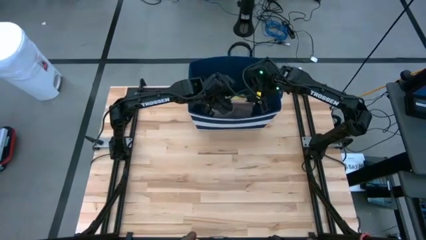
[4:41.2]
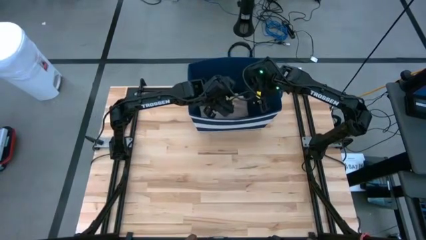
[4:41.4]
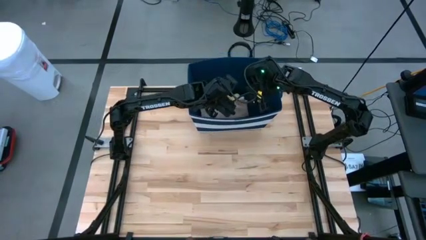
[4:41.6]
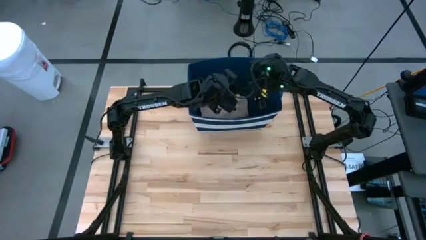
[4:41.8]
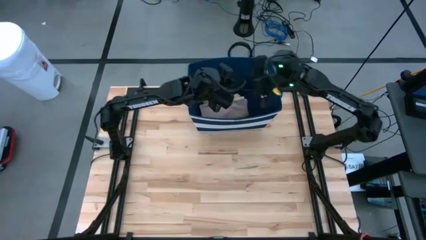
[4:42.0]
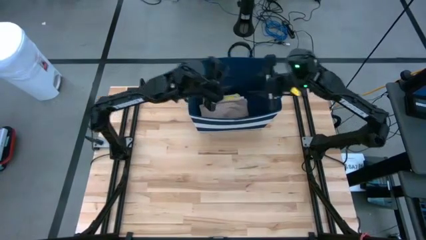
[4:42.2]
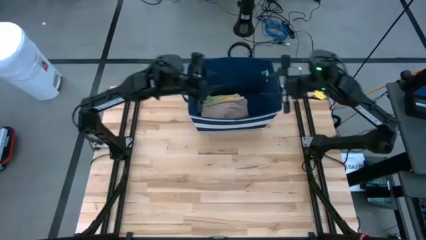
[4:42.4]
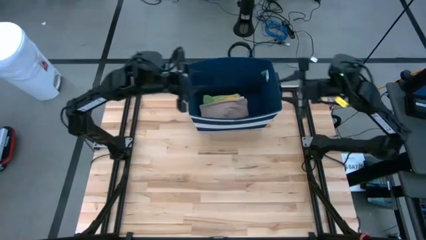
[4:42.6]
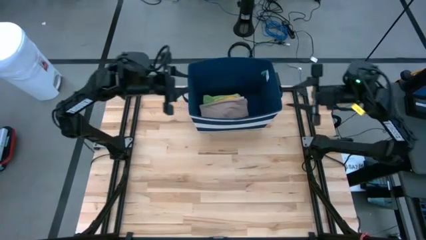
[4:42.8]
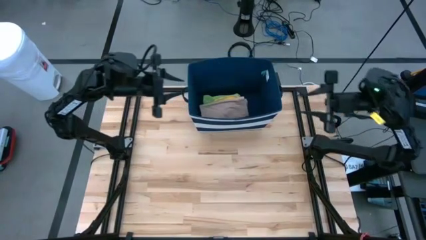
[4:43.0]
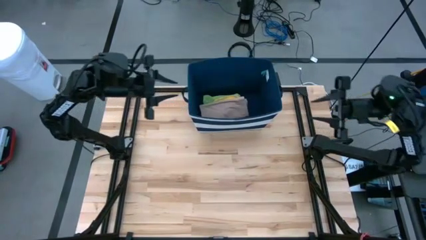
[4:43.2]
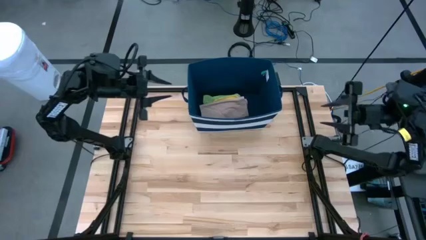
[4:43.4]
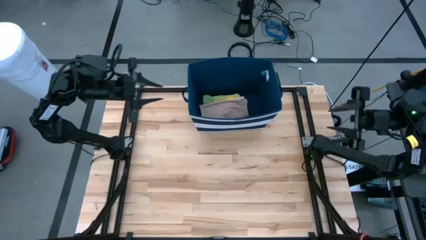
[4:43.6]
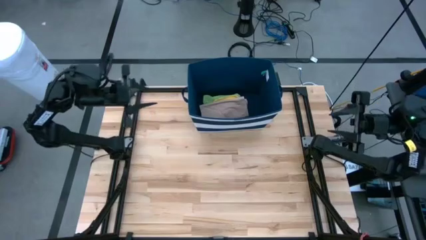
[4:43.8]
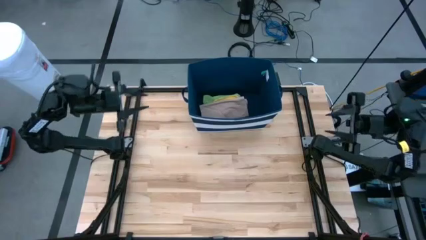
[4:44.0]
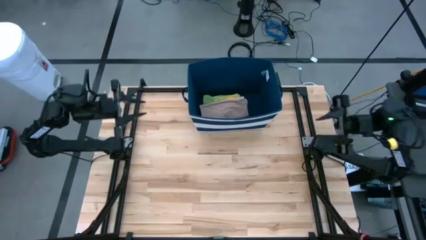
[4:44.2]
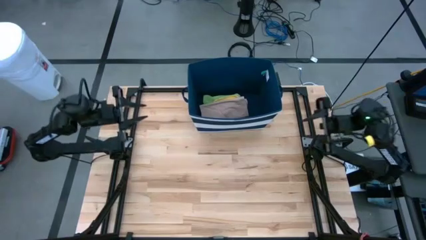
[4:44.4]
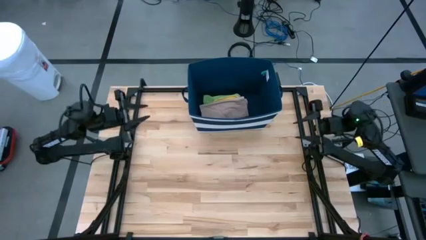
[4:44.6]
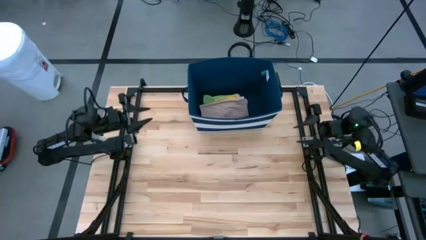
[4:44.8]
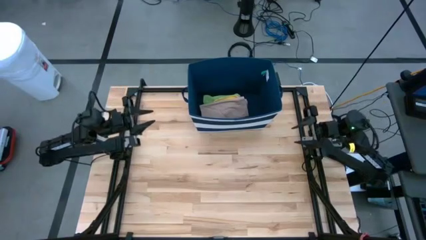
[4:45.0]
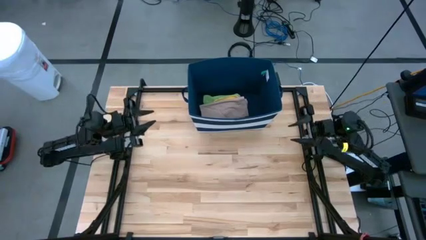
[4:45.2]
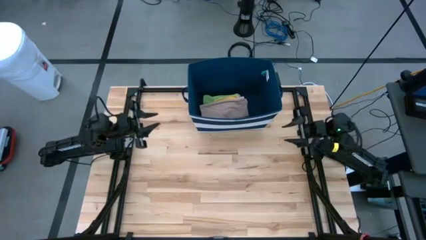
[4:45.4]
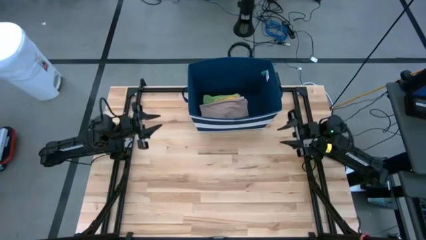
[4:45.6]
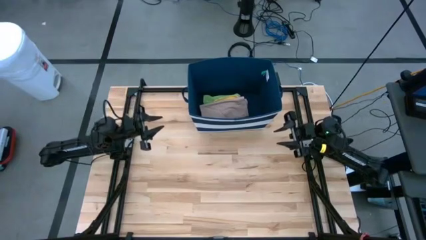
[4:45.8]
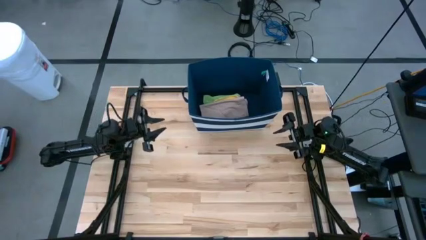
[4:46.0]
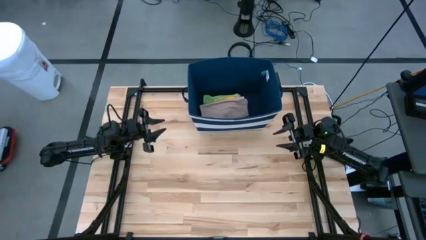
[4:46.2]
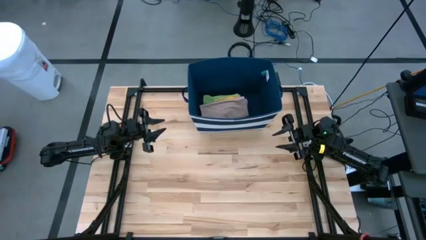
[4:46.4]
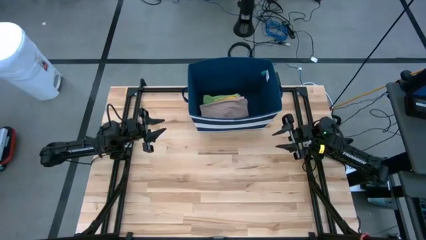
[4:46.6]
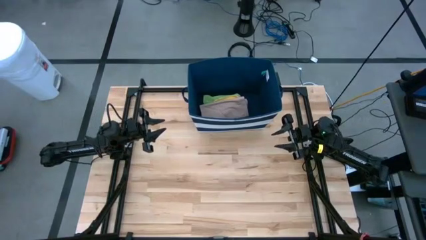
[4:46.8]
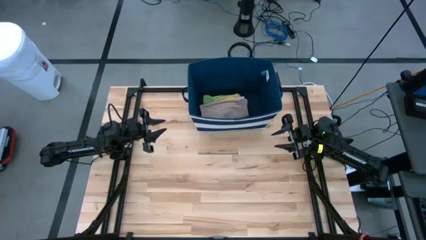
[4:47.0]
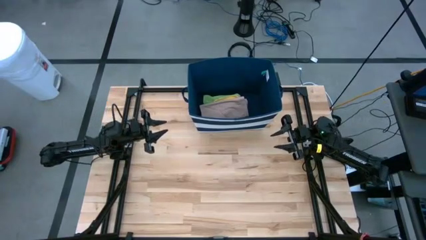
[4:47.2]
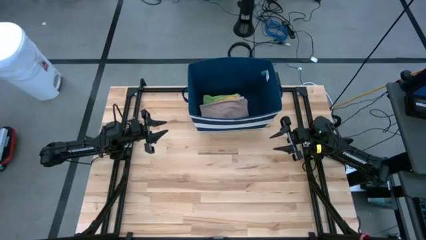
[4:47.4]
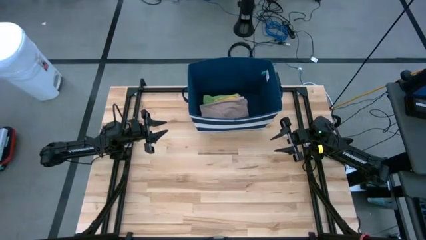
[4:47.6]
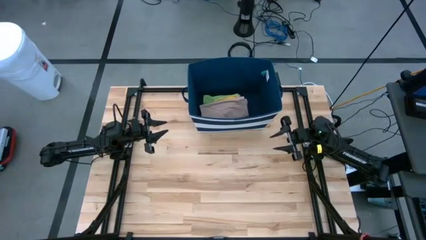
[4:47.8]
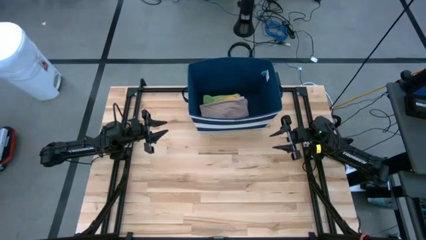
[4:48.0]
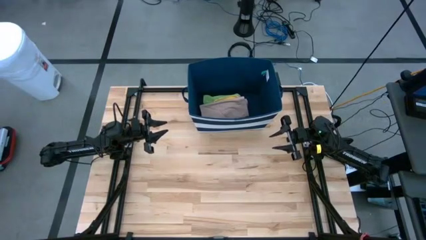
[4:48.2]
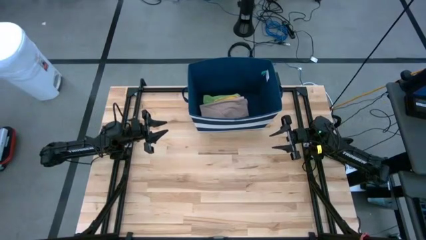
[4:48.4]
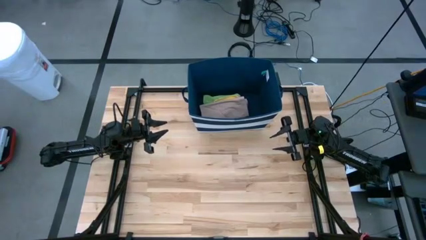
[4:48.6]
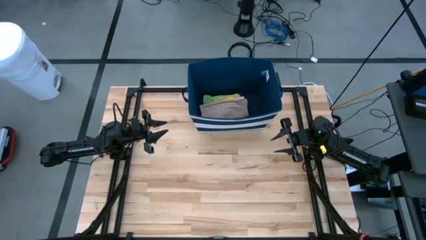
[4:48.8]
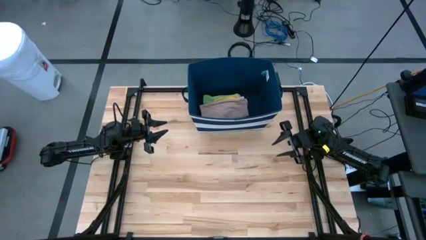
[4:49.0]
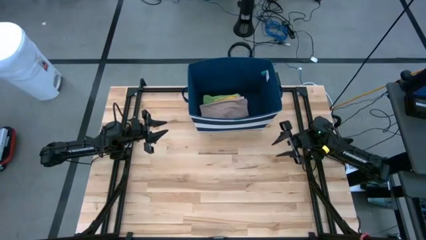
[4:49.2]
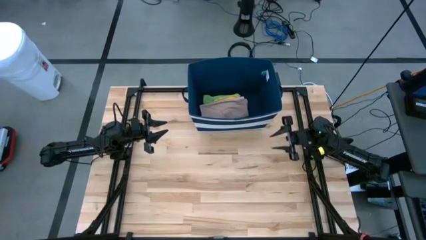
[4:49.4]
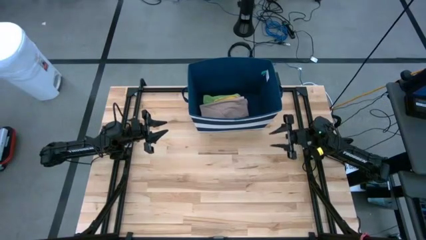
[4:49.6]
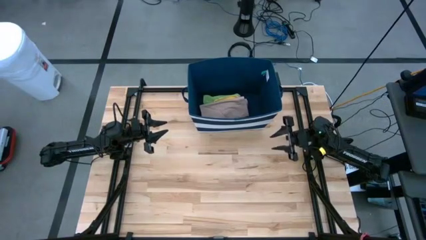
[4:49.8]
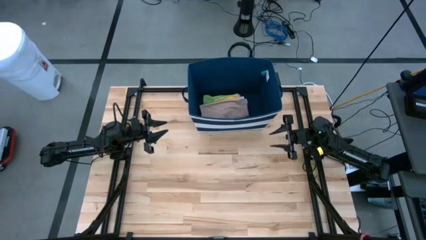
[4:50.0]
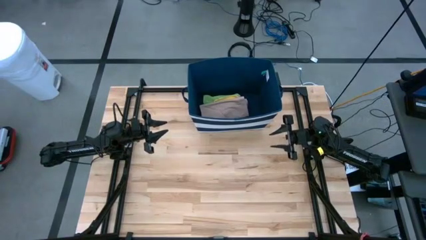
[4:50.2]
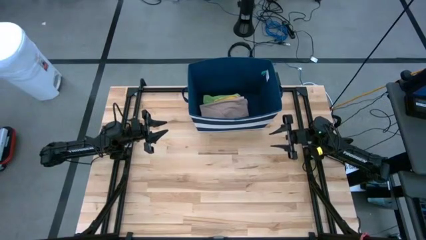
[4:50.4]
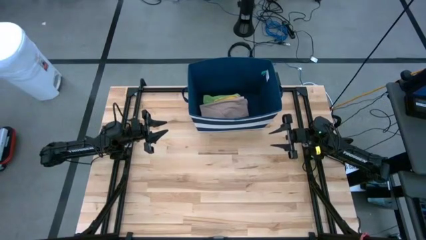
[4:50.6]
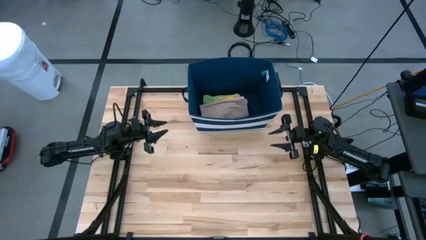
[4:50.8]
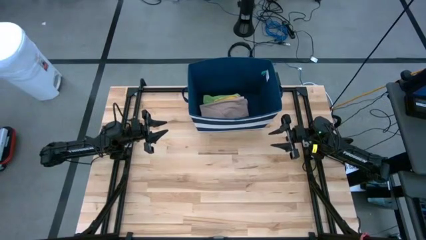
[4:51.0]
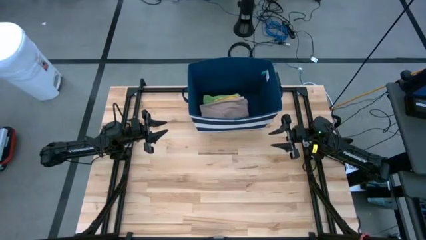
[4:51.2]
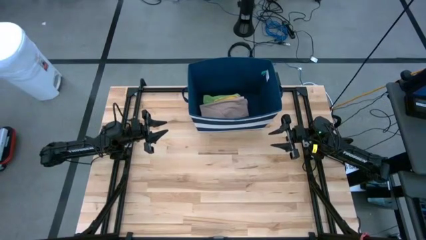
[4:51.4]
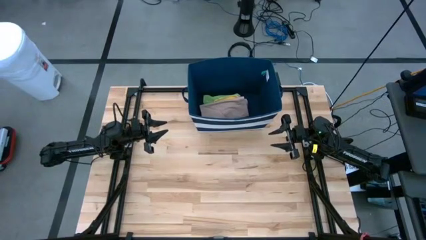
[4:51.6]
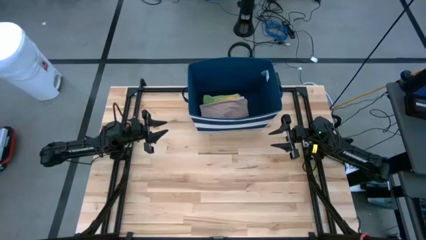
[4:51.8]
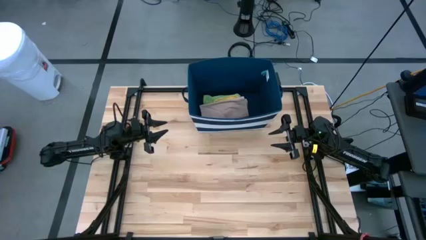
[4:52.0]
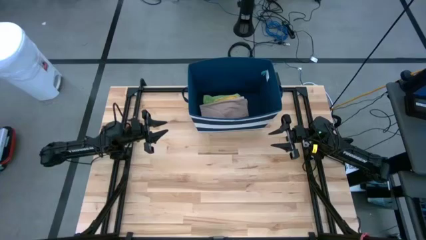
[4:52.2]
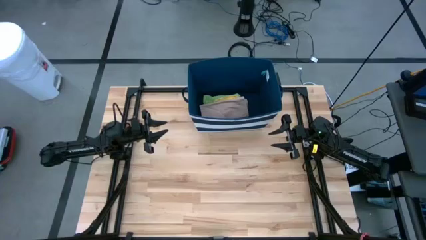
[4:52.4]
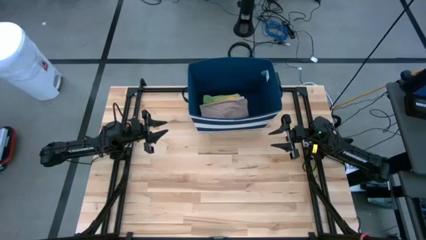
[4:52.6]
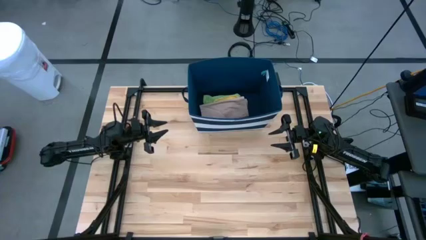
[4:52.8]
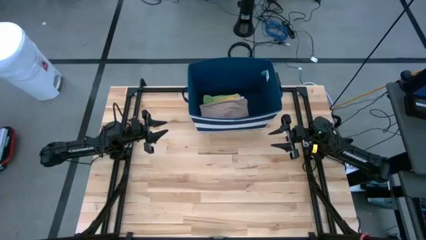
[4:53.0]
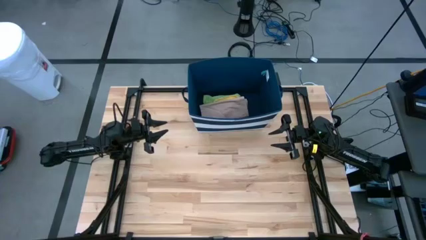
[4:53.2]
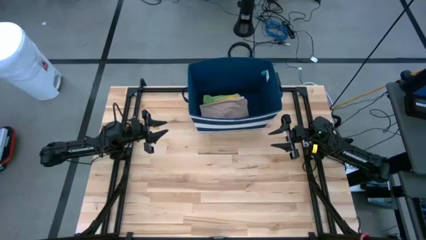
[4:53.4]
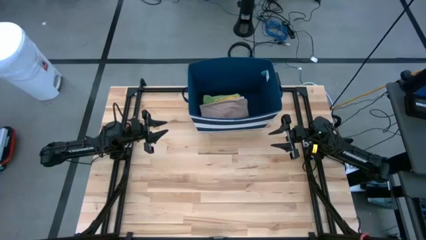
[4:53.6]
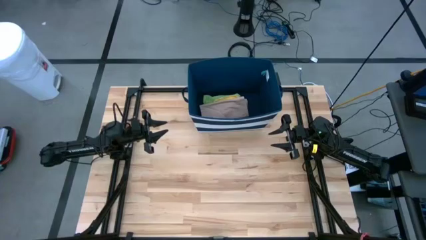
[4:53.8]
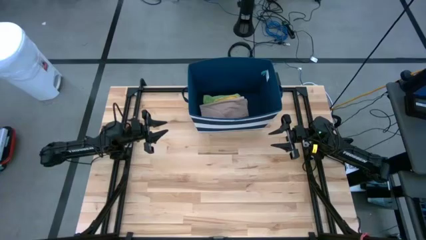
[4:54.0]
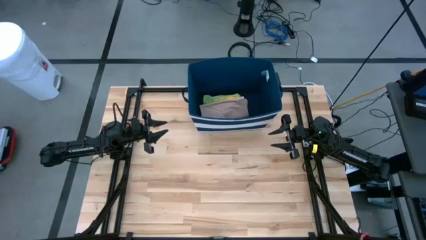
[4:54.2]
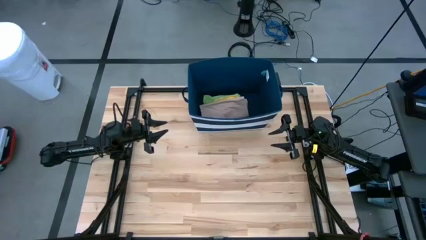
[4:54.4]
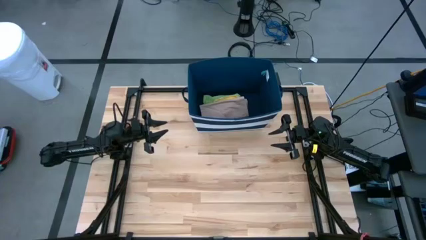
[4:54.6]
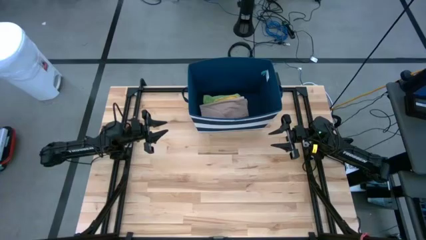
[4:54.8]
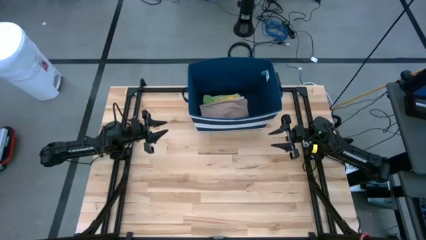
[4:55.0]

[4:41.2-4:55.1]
Task: Fold towel
Return to Home Position

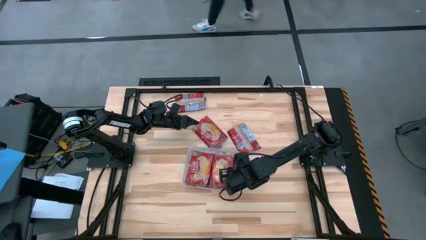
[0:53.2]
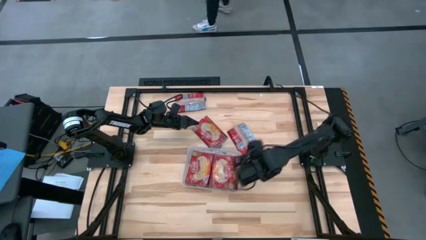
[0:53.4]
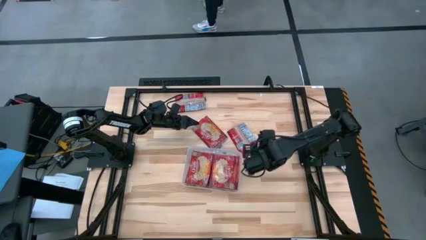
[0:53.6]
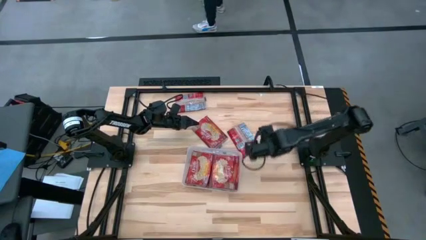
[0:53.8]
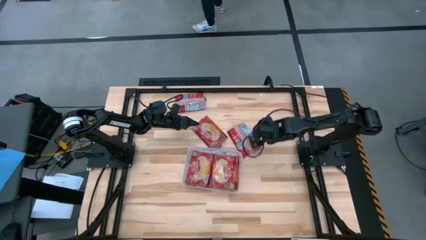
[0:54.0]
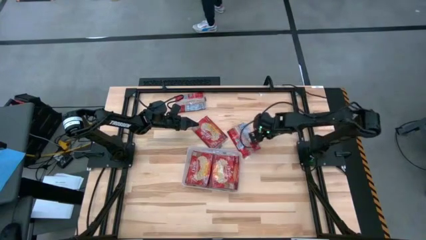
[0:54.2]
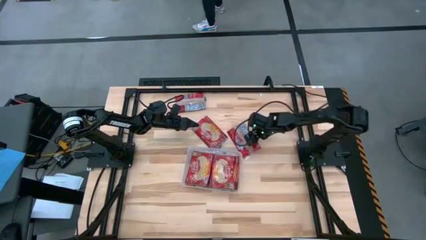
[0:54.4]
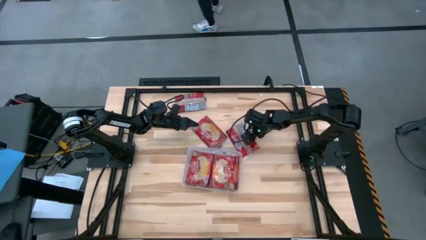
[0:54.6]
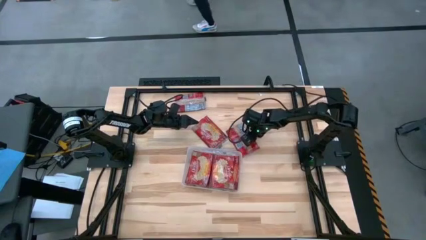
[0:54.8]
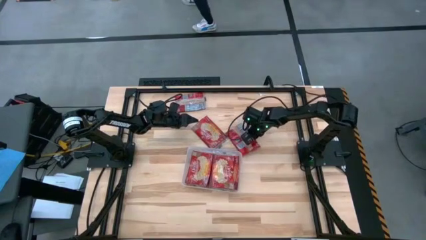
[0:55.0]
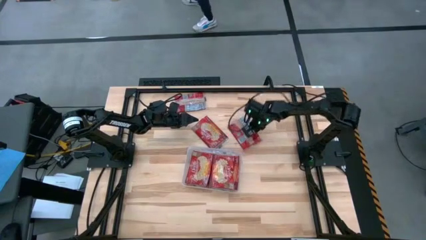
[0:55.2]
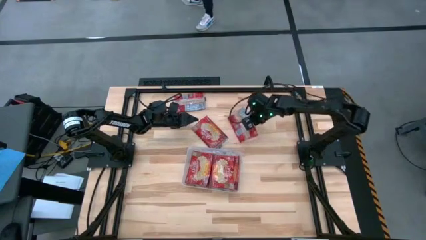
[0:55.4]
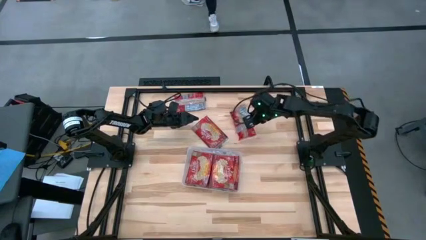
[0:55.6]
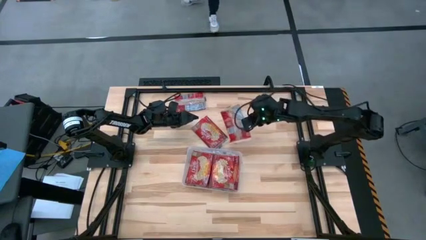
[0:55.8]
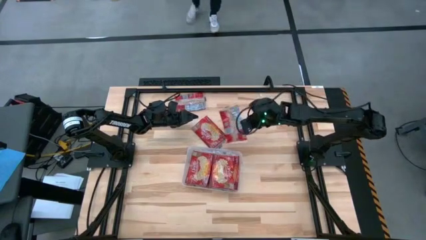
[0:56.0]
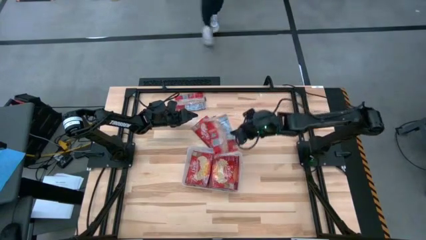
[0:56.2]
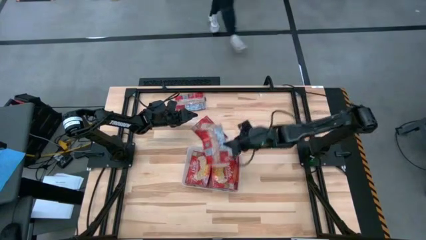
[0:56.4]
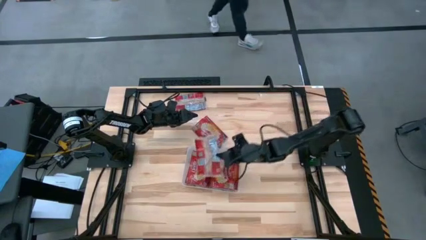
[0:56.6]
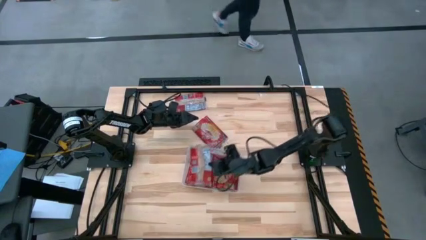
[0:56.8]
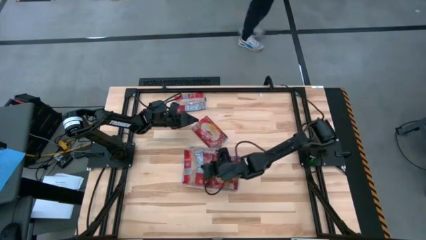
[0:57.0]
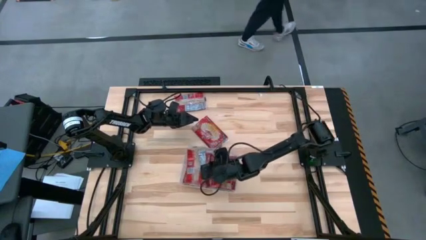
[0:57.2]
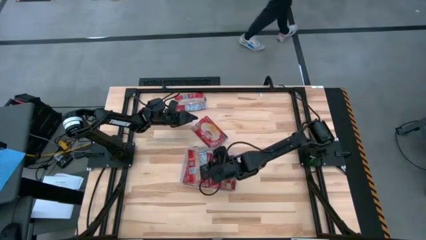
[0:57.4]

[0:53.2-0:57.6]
Task: Sort popcorn bags into baskets
Put the red popcorn bag into the transparent bin
